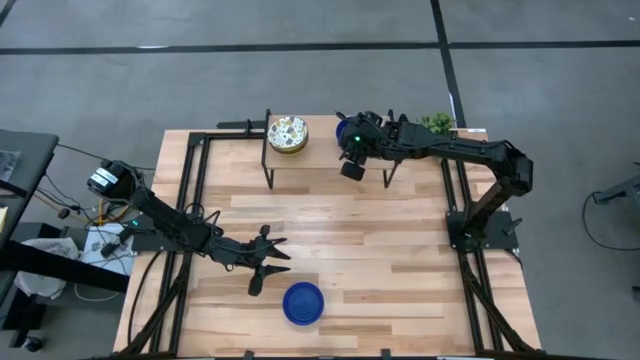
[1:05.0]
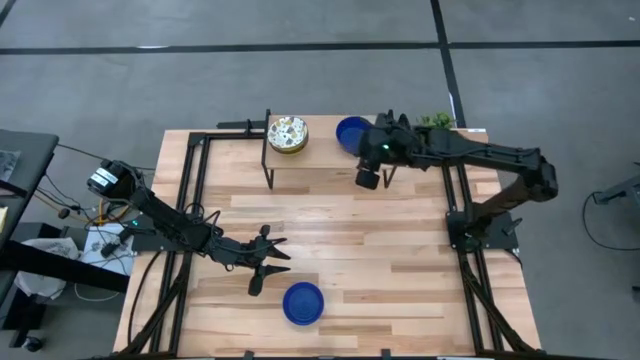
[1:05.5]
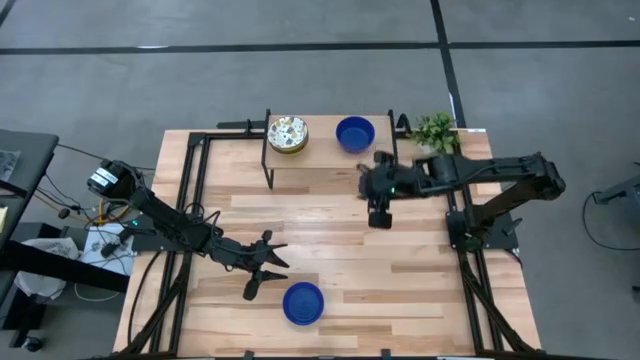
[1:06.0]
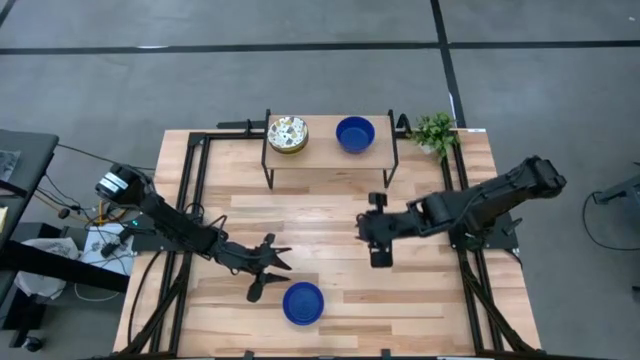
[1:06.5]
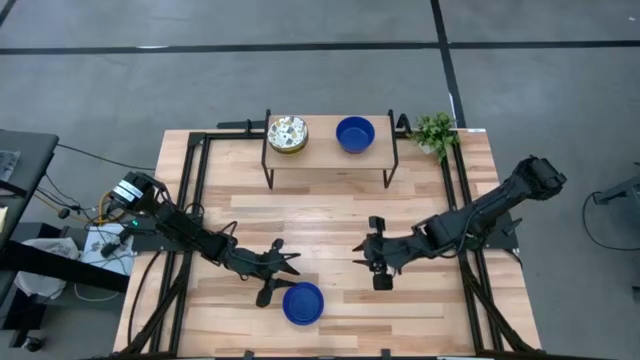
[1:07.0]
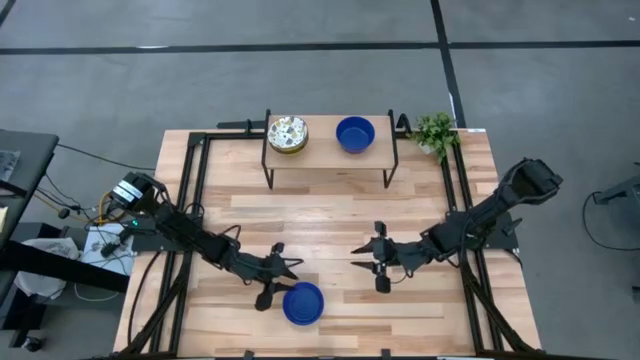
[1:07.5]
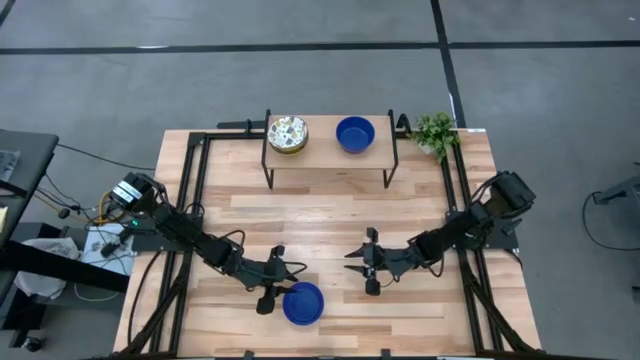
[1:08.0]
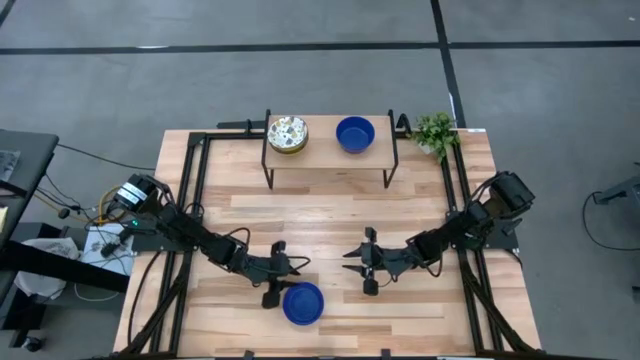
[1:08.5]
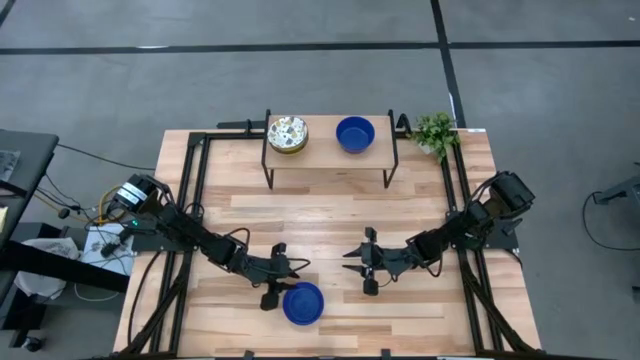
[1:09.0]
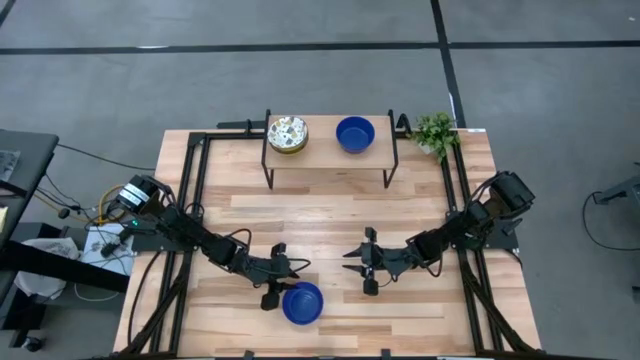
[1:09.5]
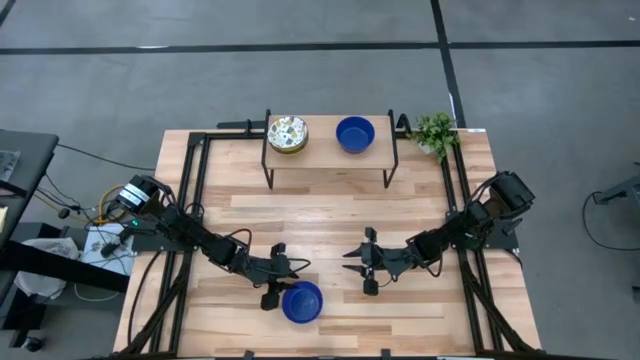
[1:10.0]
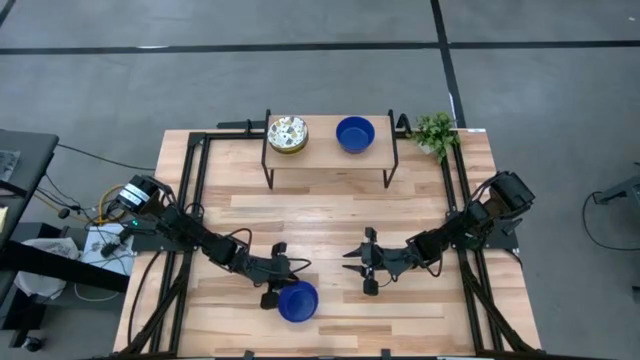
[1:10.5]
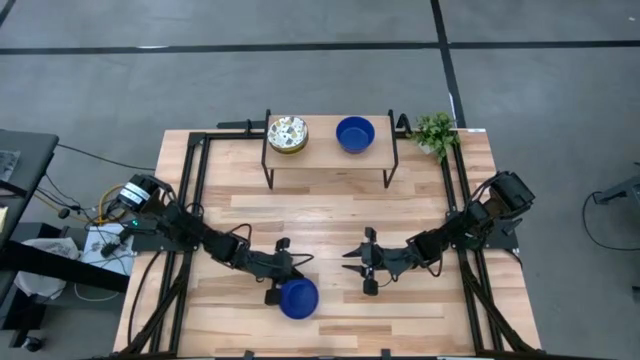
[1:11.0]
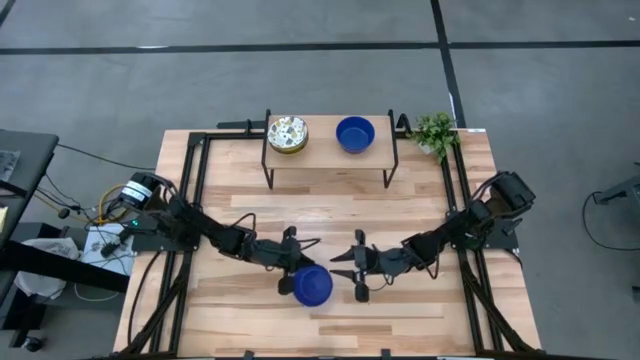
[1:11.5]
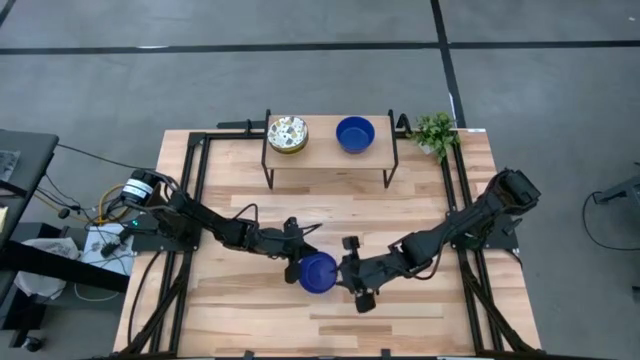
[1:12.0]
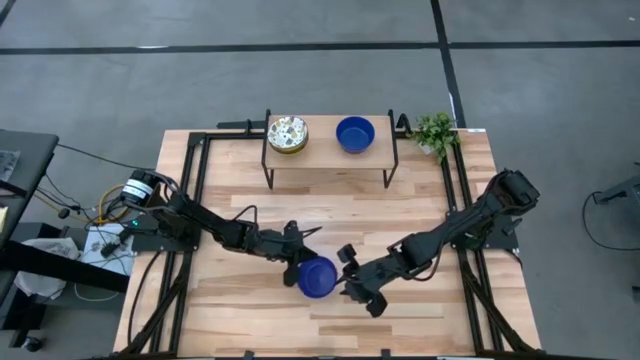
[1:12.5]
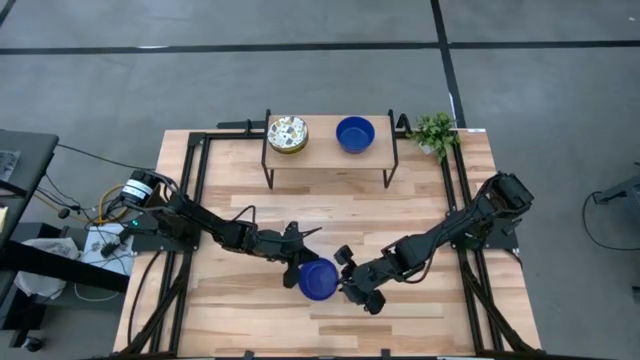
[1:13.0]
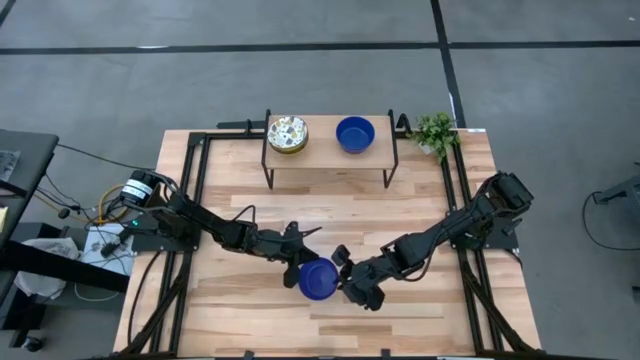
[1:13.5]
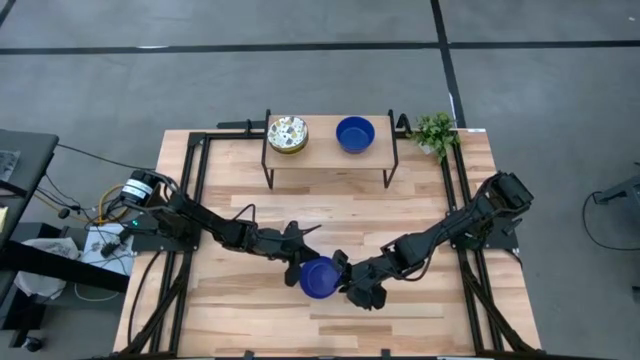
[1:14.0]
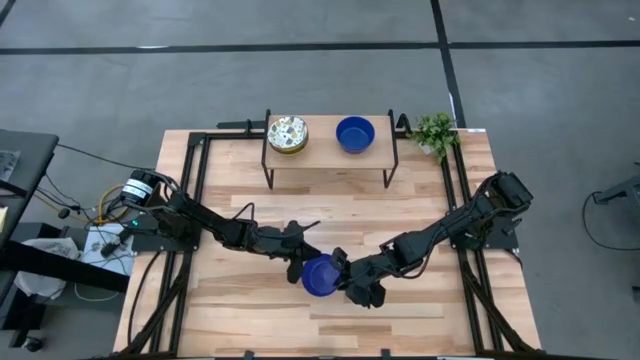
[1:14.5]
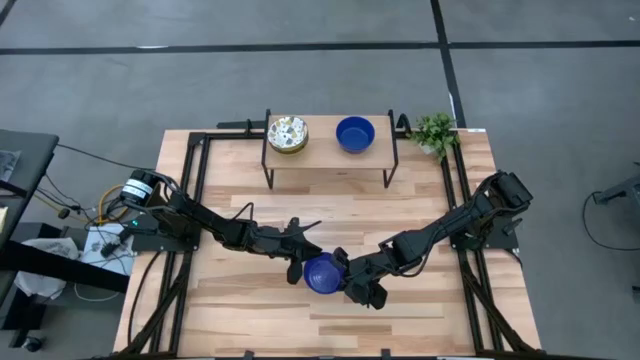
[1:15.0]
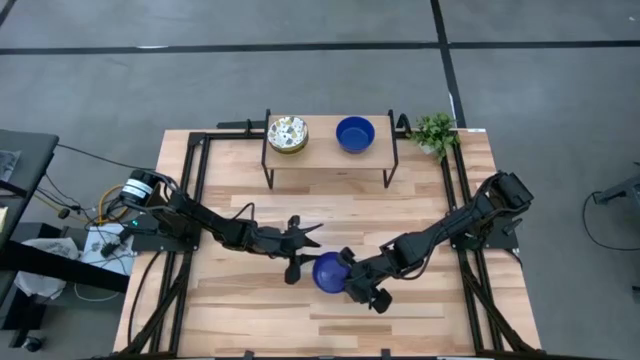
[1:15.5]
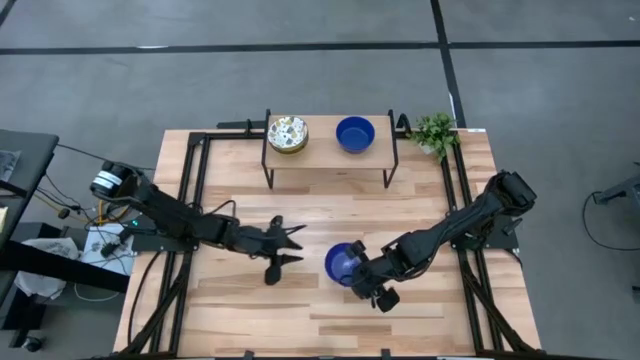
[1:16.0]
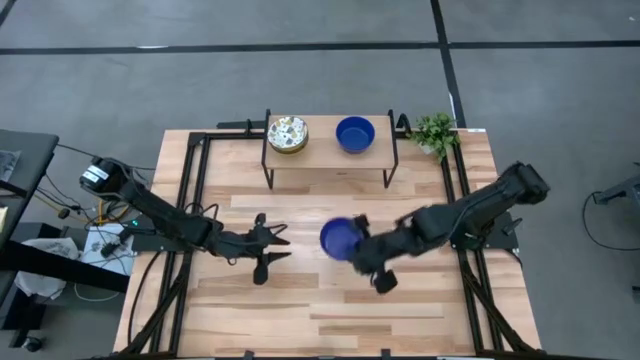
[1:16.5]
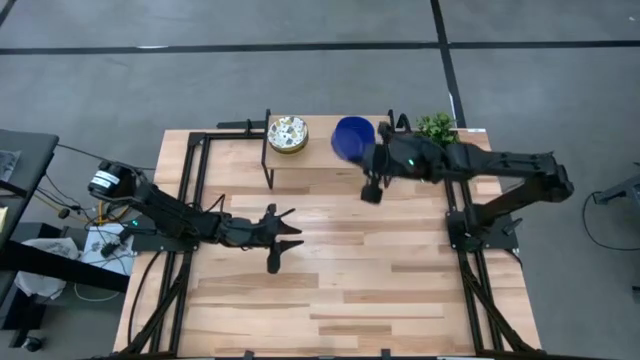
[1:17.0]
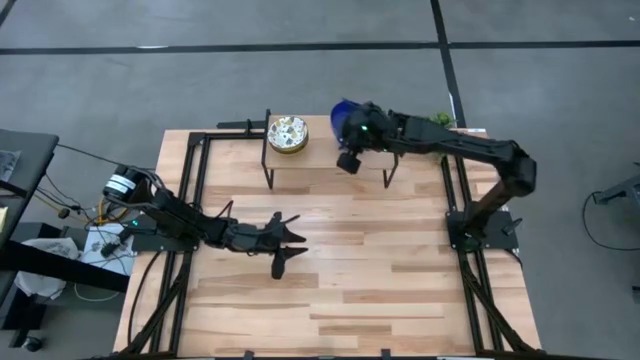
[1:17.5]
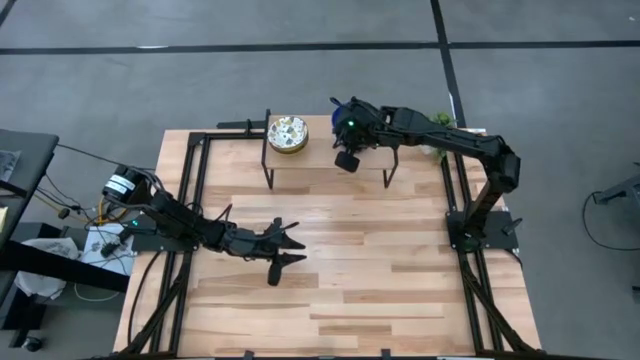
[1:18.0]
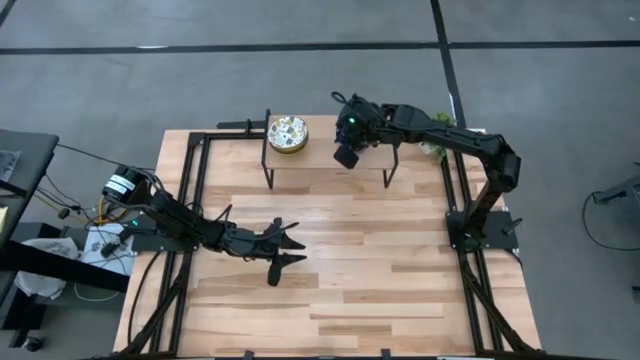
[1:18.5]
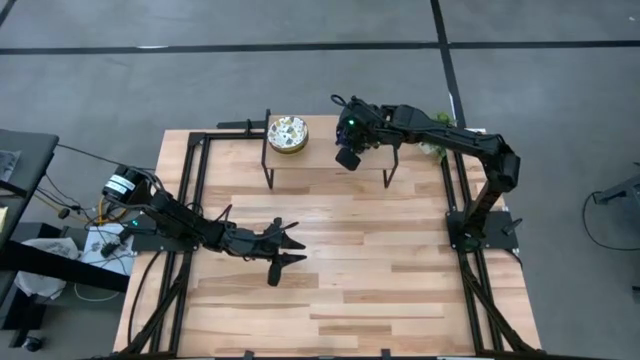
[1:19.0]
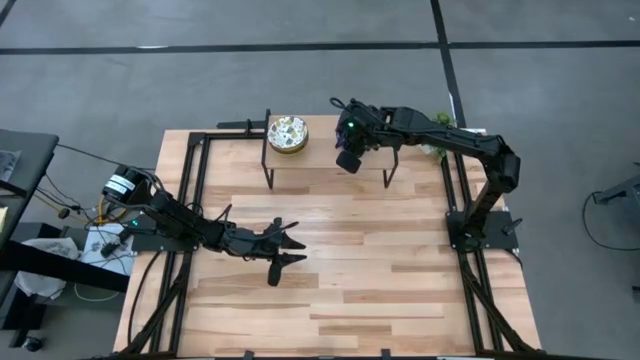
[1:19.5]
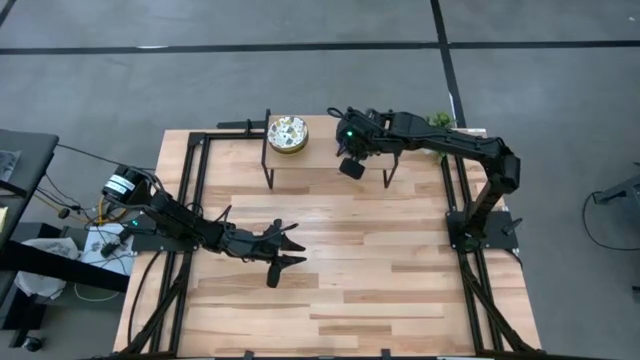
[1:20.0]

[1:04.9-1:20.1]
Task: Pick & Place Mini bowls
Stack the blue bowl on top of the stacked blue bowls on the shelf

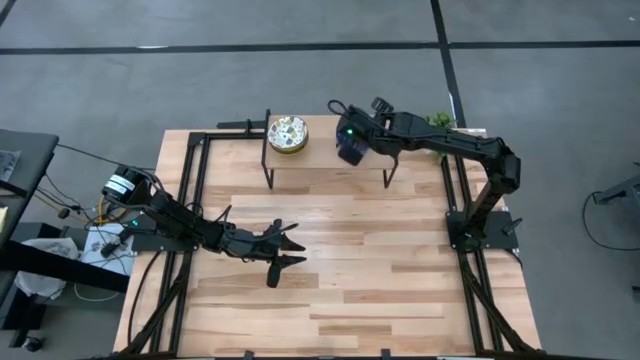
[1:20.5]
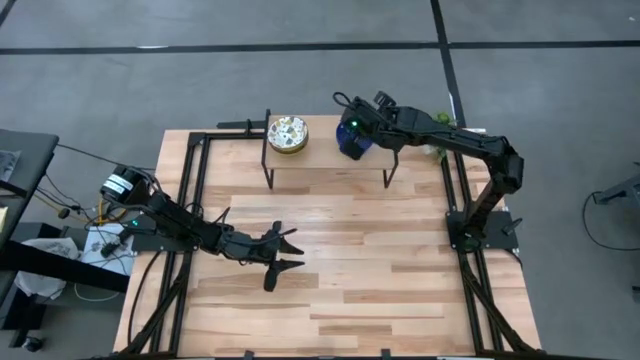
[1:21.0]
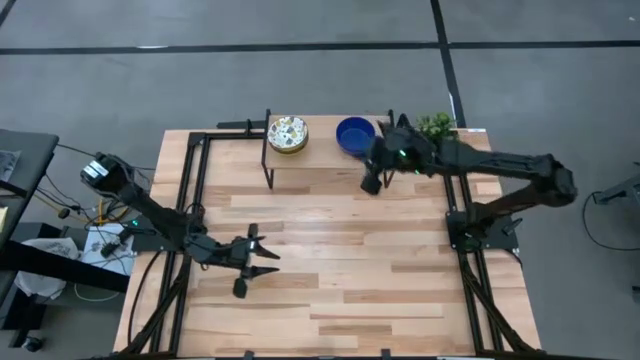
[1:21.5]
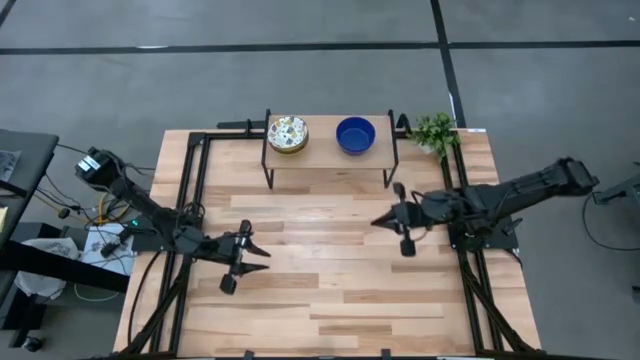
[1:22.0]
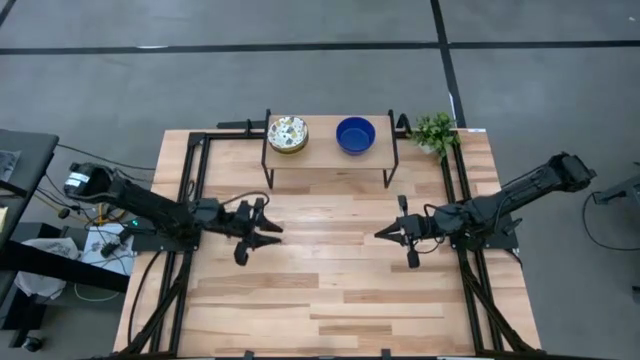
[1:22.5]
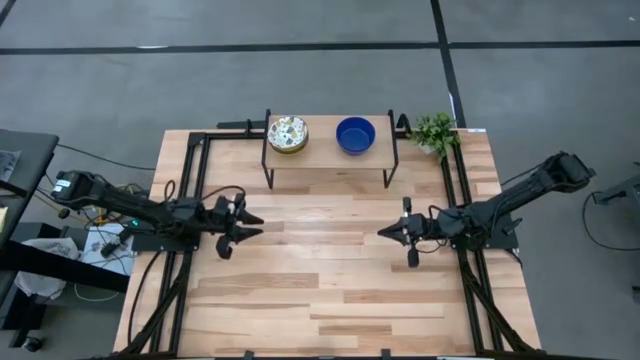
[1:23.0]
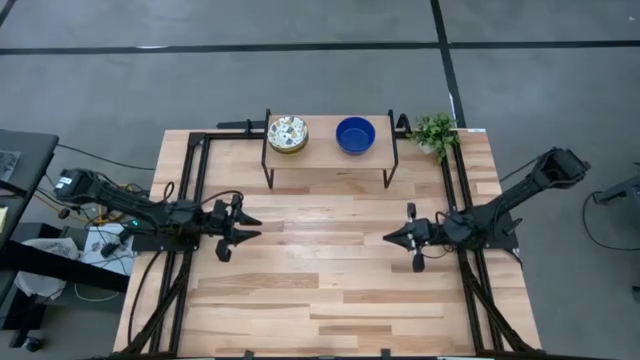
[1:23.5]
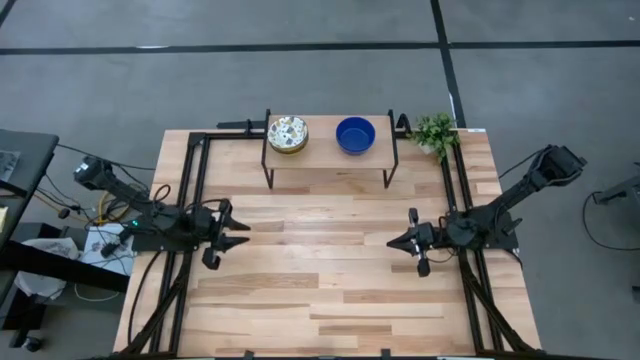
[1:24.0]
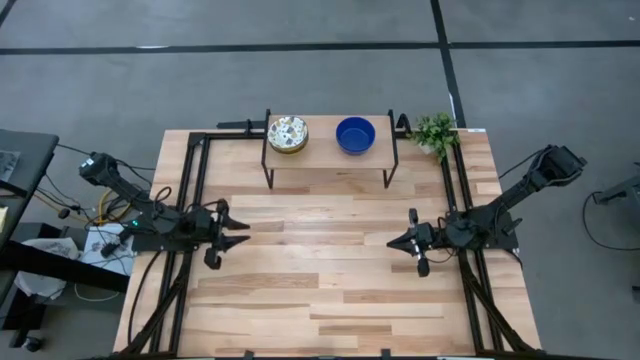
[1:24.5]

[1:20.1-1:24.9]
Return to Home Position
